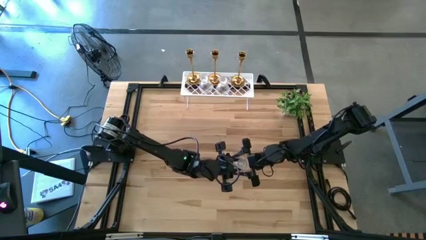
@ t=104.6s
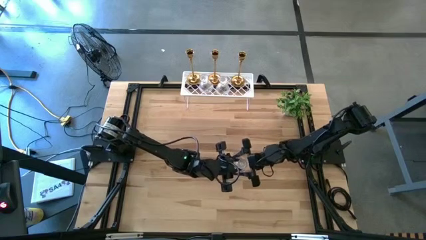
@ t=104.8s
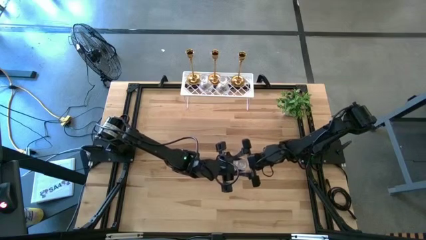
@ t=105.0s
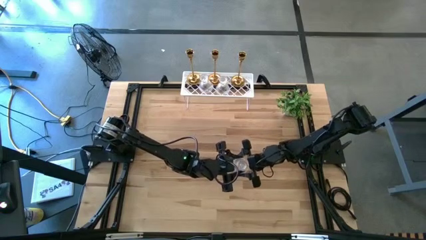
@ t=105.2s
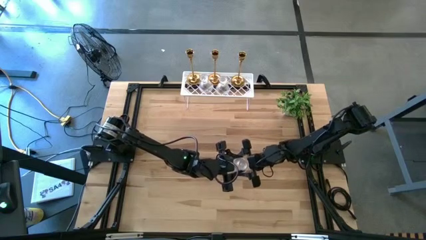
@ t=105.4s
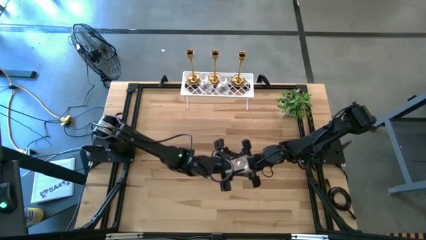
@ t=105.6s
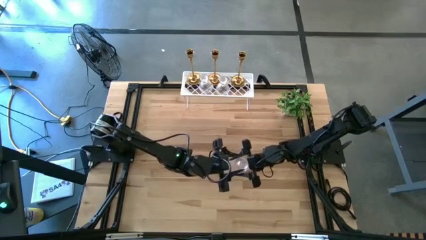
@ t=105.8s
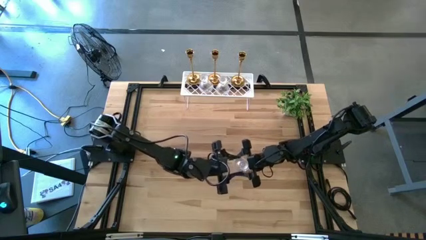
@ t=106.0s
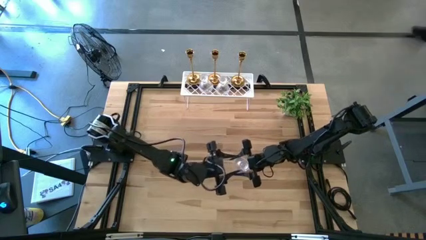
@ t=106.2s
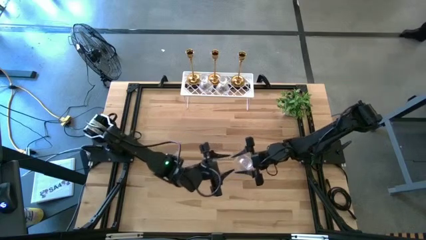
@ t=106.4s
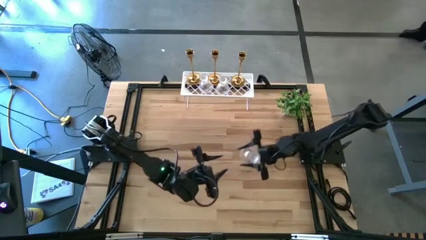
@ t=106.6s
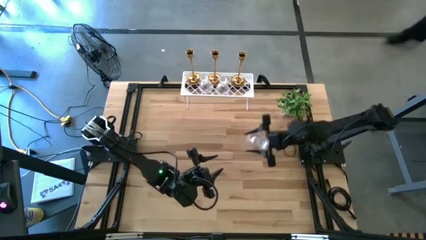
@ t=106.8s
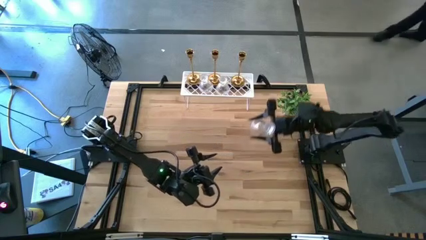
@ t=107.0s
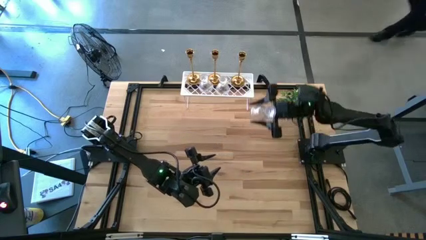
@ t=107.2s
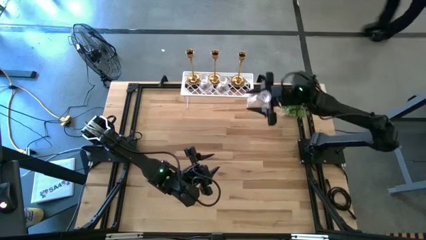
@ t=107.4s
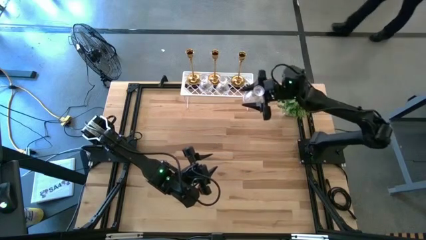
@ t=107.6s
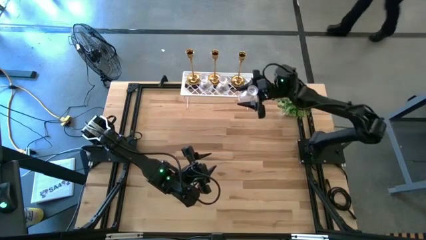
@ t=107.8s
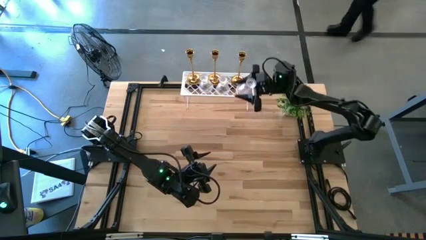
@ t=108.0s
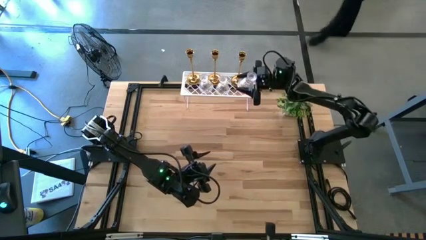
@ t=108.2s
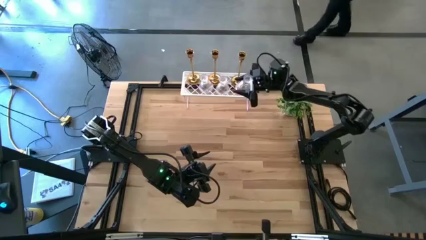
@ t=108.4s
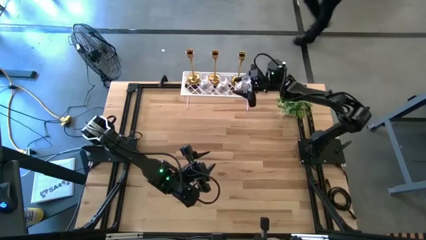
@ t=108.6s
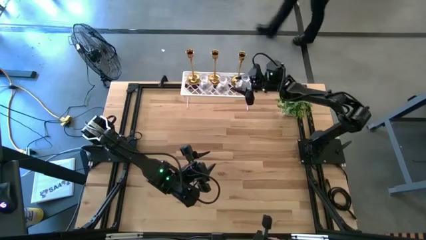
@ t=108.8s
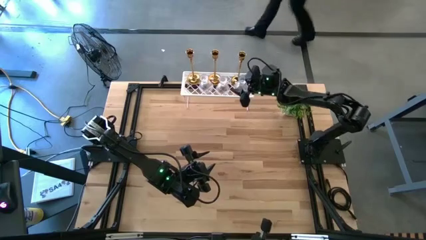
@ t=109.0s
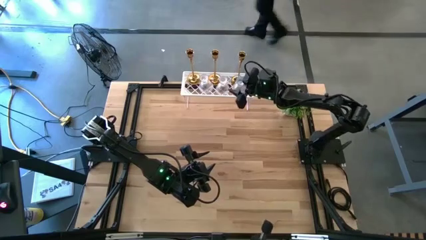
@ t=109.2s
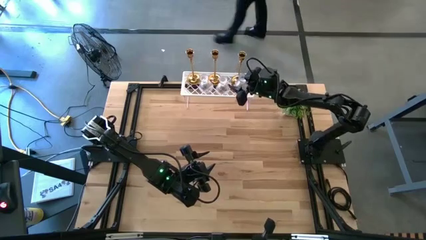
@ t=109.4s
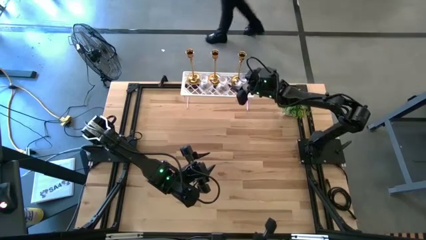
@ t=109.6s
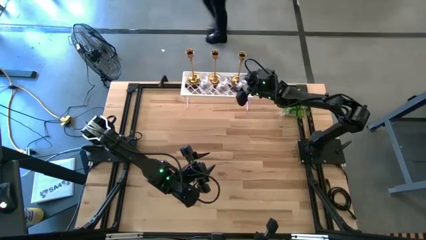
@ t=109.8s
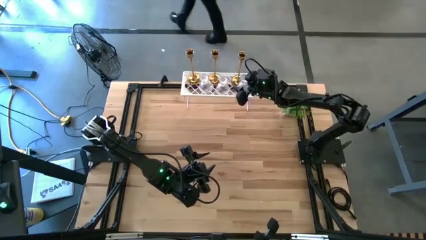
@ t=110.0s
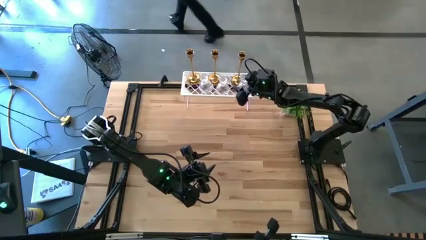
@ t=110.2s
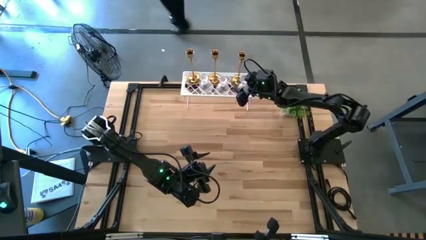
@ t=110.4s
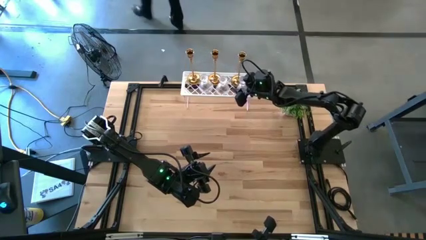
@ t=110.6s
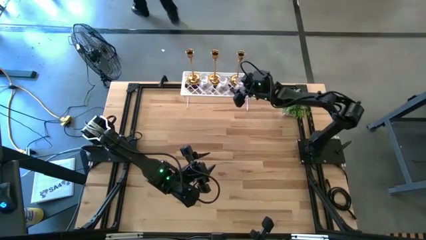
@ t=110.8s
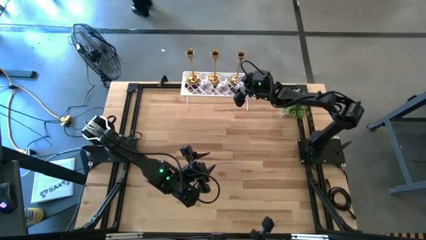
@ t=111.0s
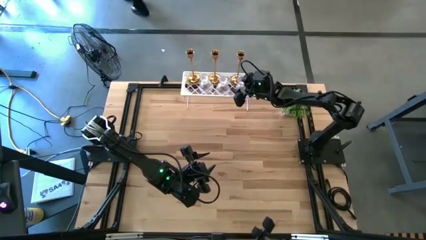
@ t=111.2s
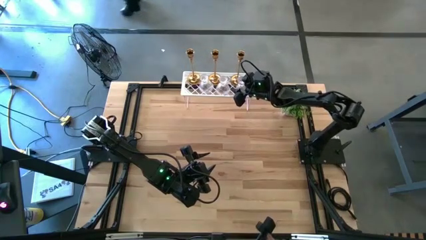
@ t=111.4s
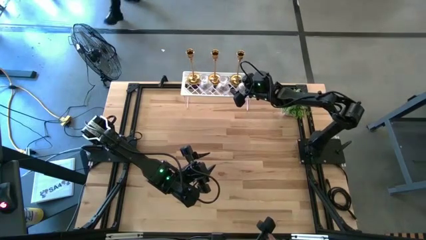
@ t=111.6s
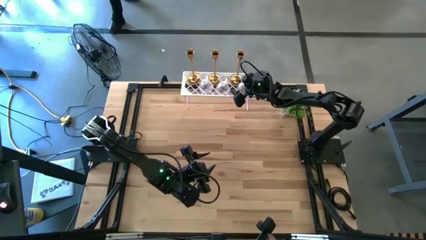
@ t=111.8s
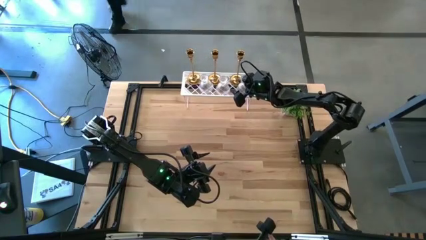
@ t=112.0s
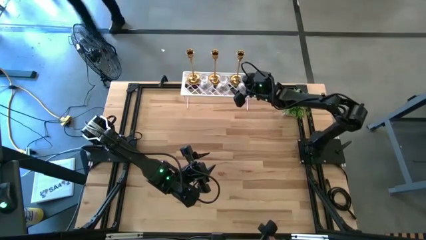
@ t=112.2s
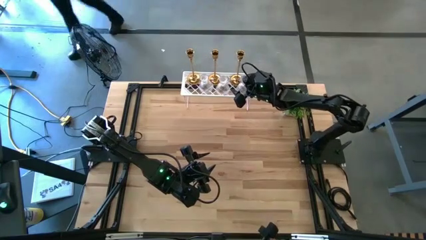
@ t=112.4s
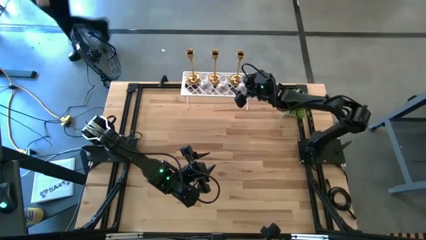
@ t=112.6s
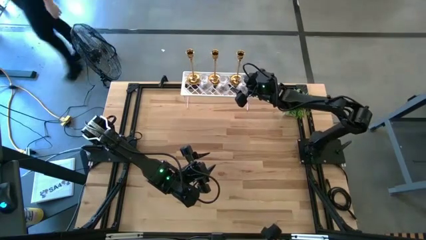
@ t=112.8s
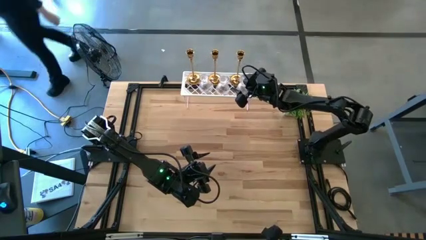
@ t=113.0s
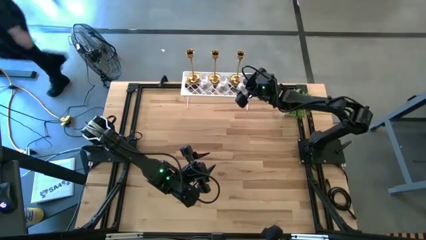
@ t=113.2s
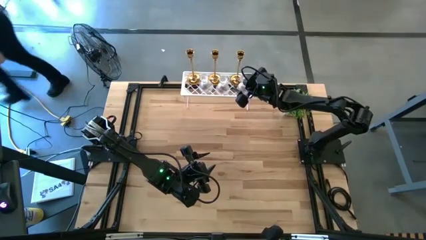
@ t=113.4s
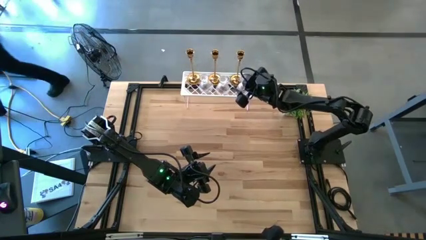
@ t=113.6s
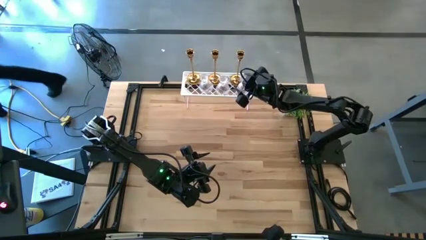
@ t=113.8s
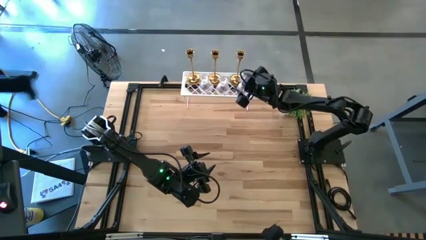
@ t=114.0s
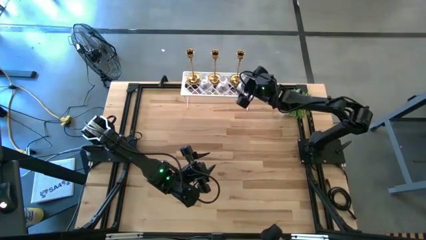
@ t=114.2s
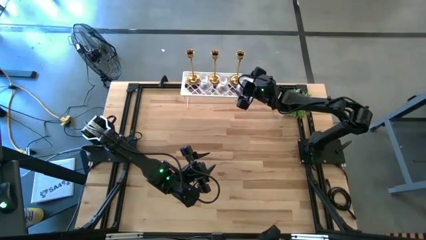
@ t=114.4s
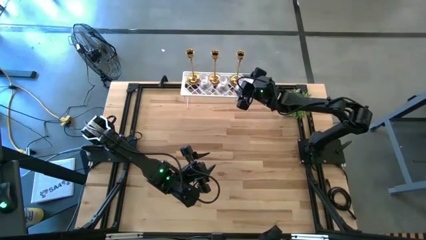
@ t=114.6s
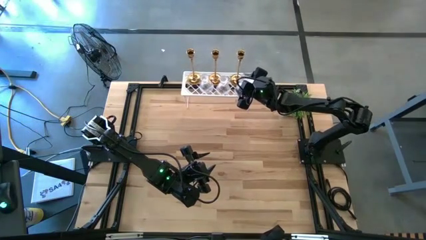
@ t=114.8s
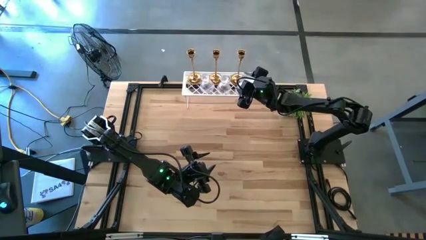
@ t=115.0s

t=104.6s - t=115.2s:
Task: Pick & Place candle stick holders
Put the glass candle holder on the shelf

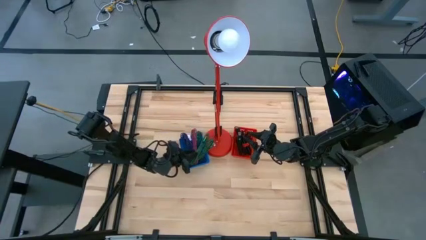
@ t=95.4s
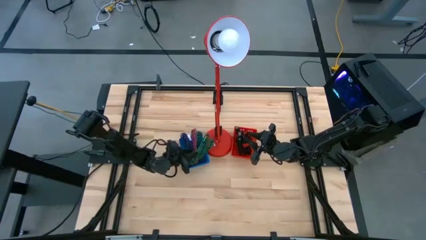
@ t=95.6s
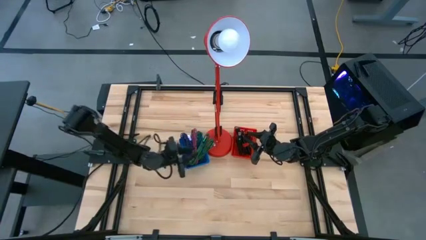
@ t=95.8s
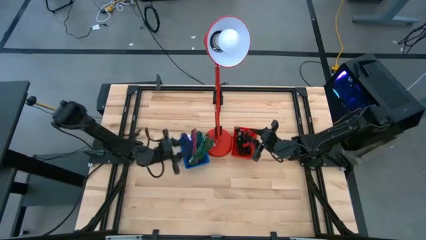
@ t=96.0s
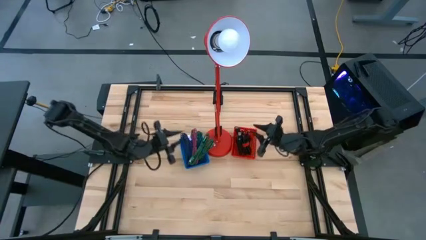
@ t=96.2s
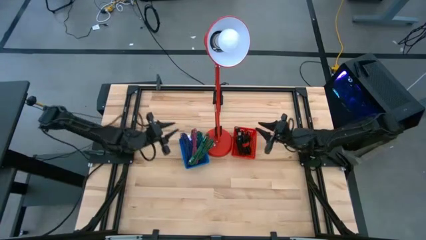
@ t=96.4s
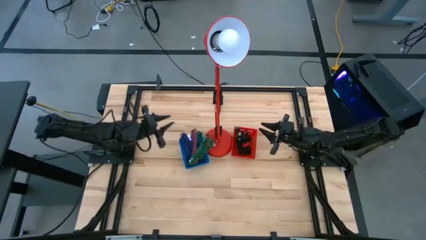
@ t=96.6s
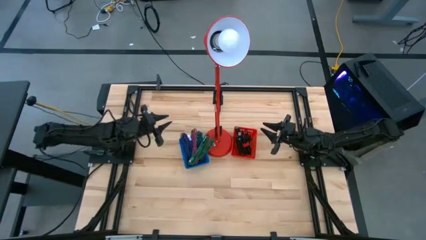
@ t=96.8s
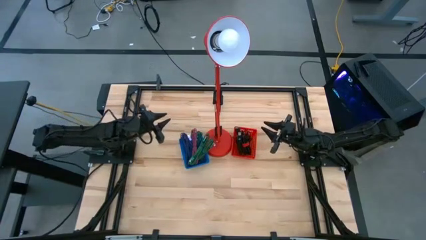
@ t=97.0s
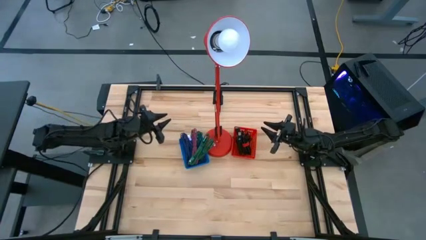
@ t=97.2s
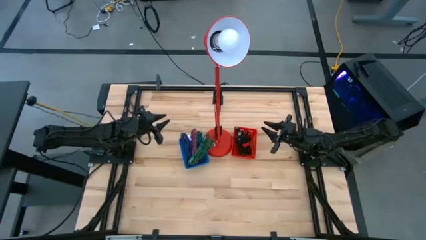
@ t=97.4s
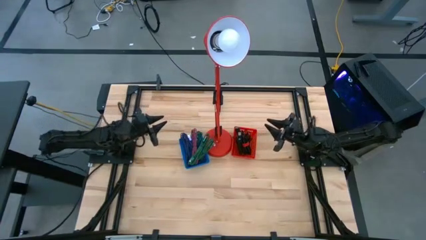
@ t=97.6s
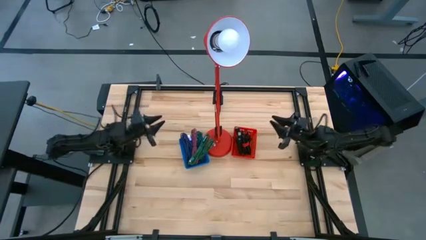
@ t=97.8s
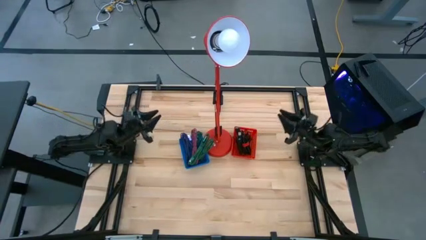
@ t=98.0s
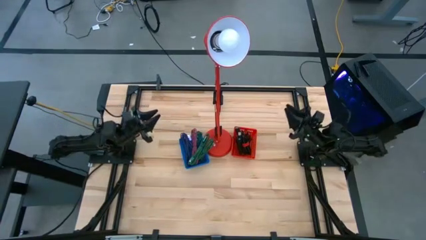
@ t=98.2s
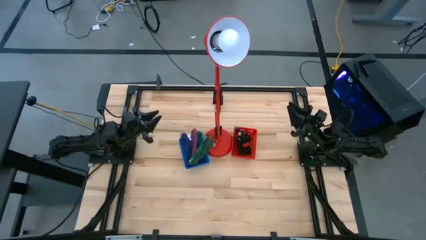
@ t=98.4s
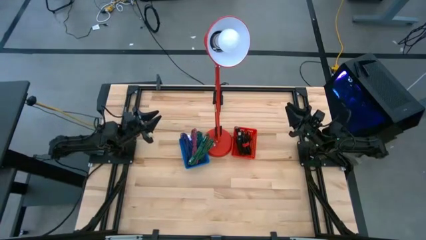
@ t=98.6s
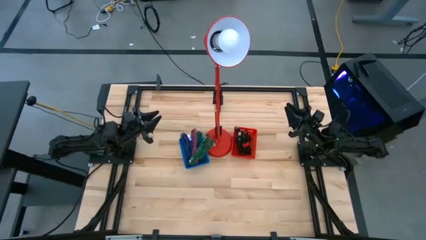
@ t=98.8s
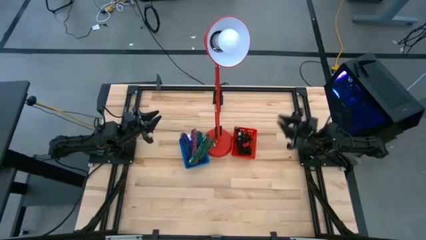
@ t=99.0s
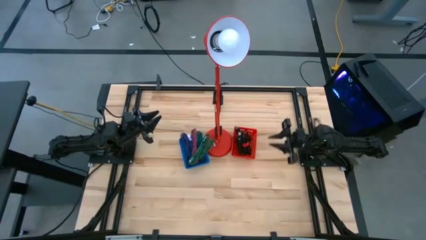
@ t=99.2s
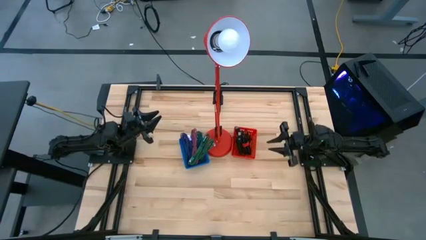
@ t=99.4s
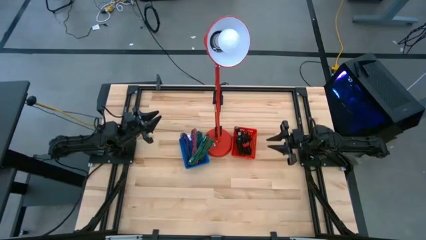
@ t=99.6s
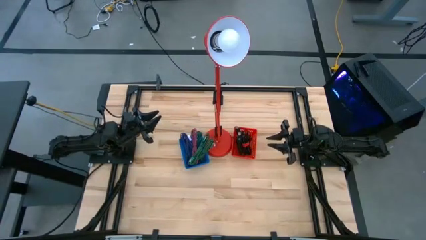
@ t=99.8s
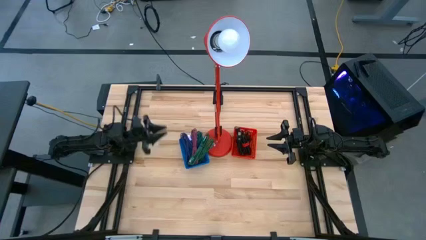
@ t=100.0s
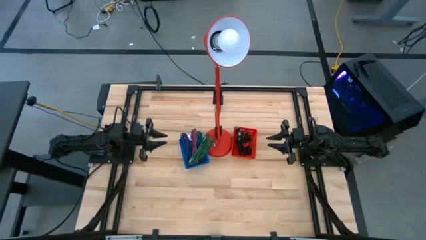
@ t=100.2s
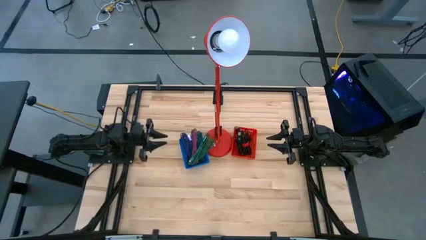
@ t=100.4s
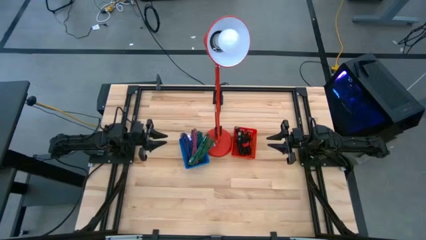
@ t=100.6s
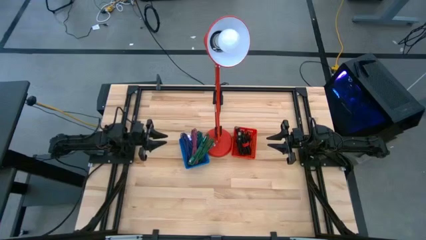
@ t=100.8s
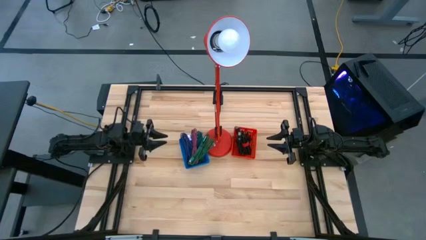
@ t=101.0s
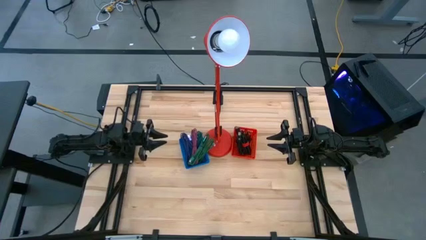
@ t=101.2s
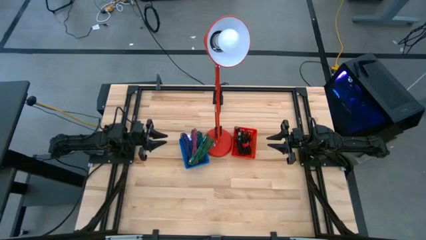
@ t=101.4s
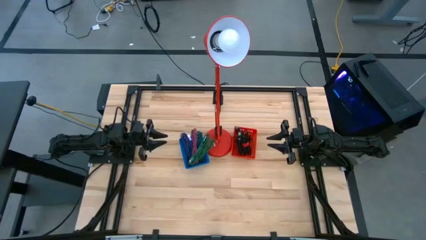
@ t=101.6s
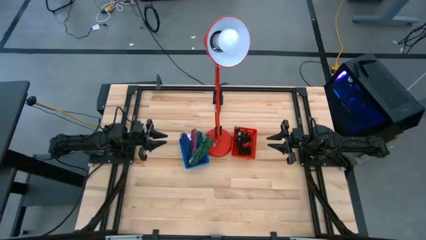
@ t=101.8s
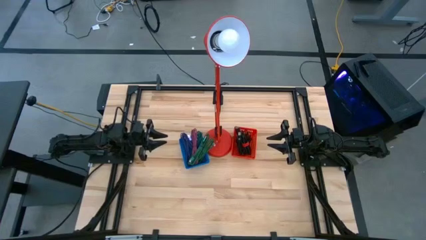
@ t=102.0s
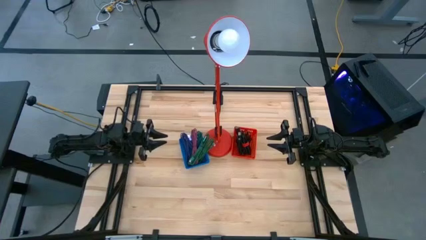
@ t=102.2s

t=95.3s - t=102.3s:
Task: Pick & Place USB Port
Return to Home Position
